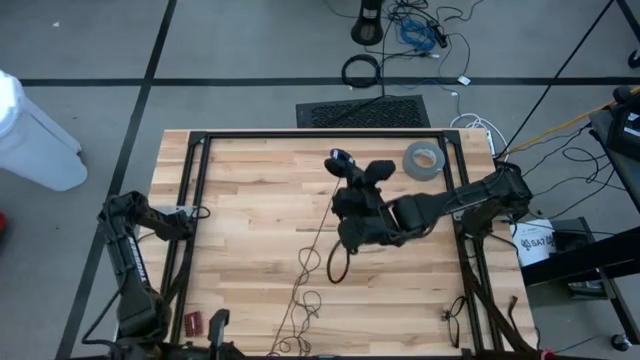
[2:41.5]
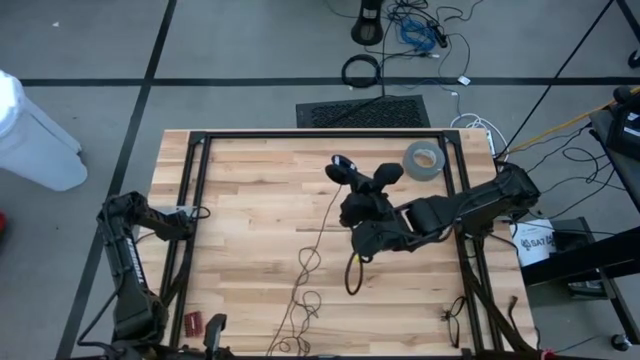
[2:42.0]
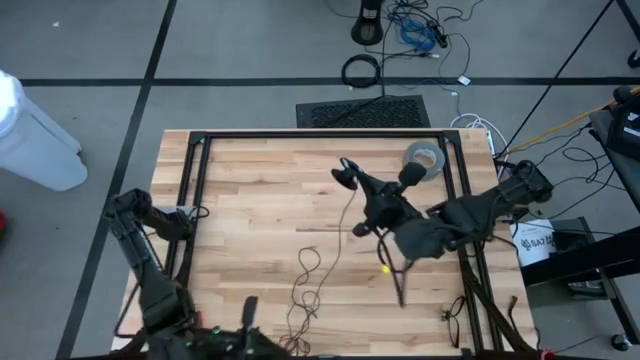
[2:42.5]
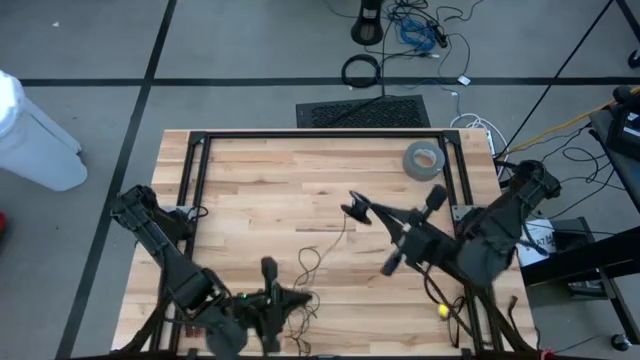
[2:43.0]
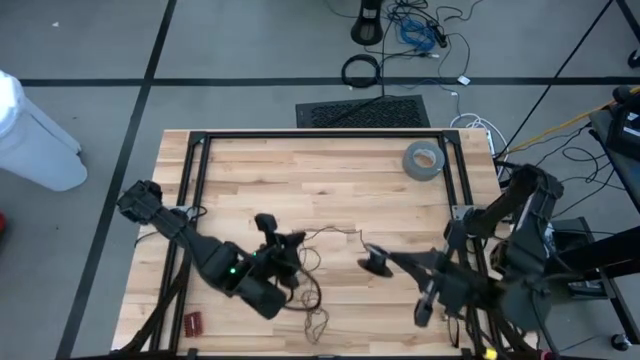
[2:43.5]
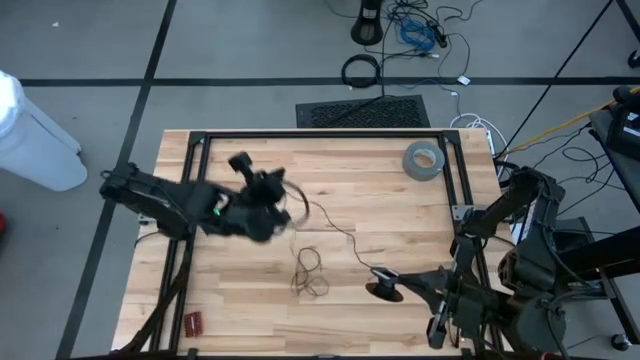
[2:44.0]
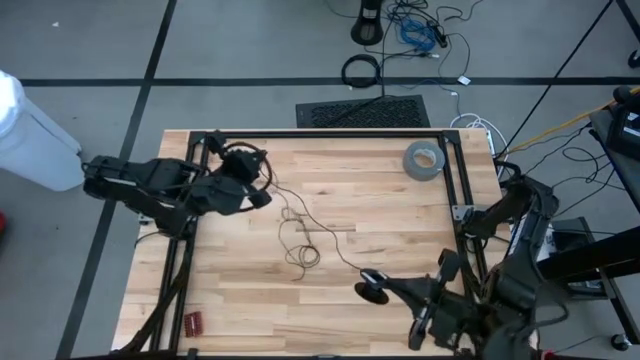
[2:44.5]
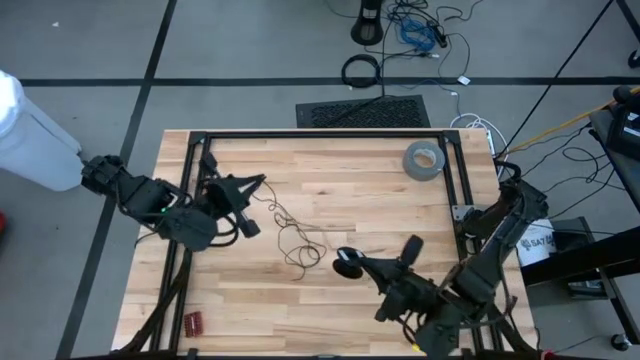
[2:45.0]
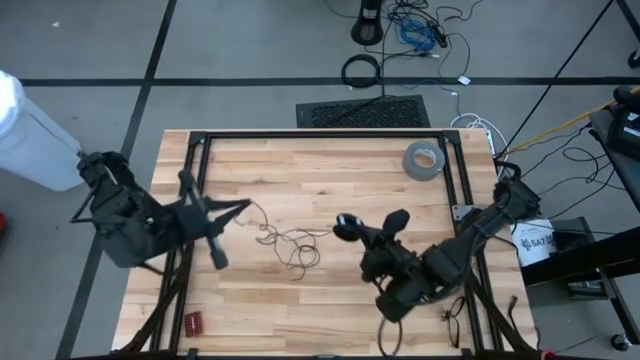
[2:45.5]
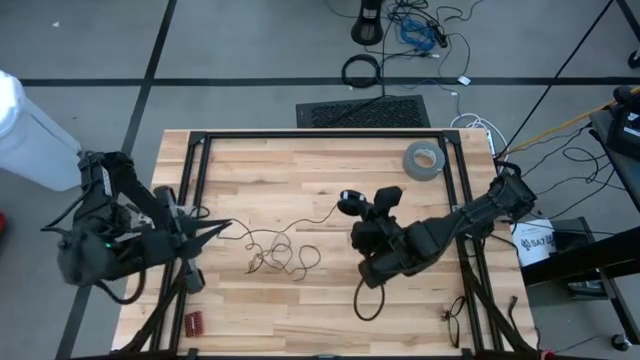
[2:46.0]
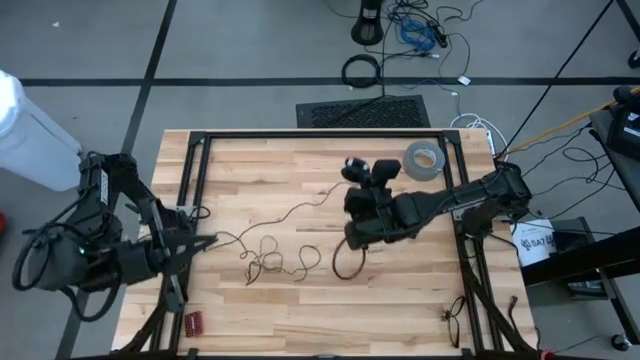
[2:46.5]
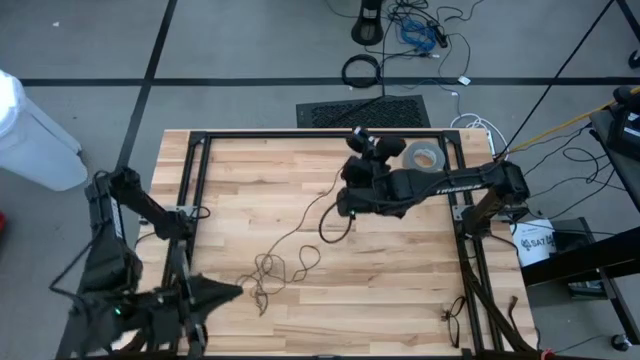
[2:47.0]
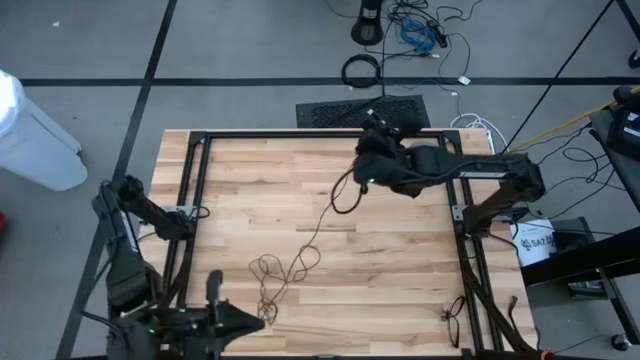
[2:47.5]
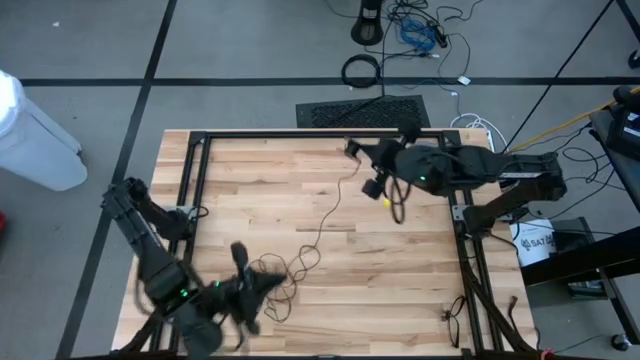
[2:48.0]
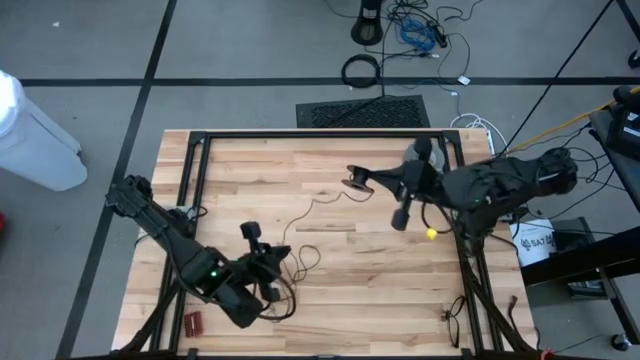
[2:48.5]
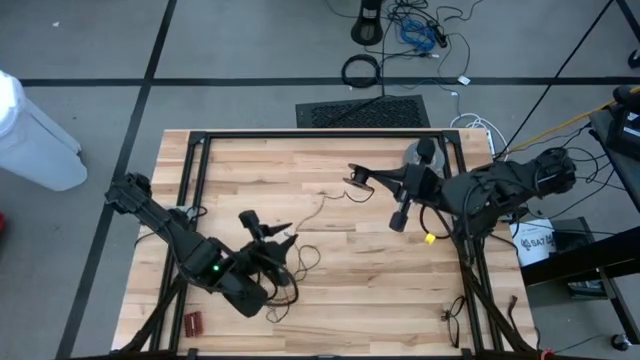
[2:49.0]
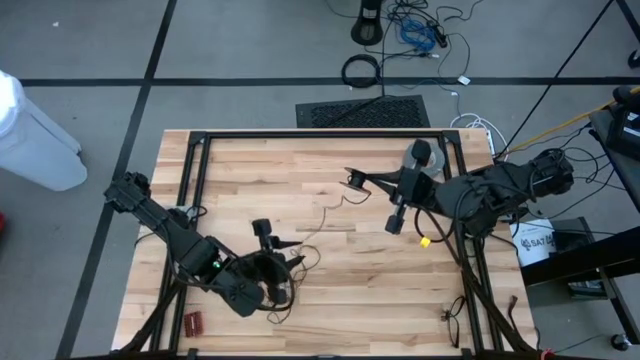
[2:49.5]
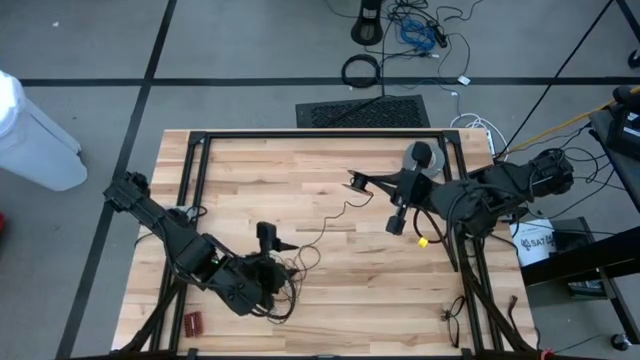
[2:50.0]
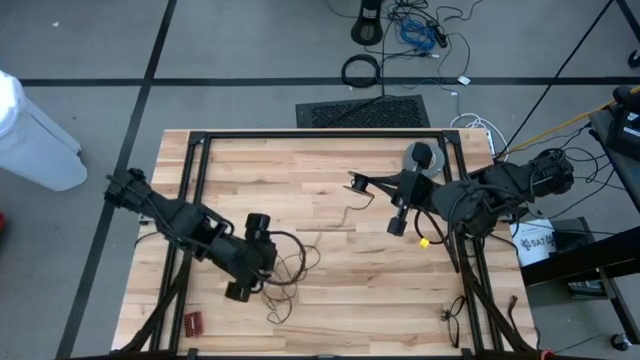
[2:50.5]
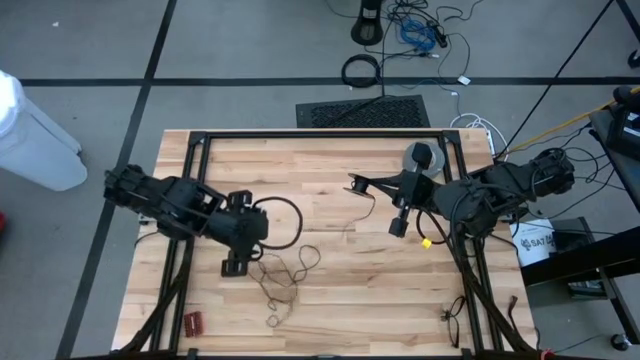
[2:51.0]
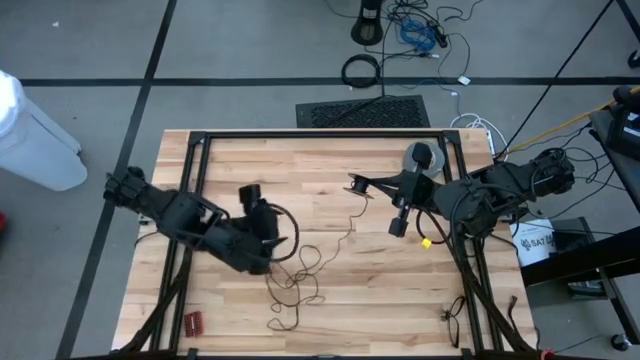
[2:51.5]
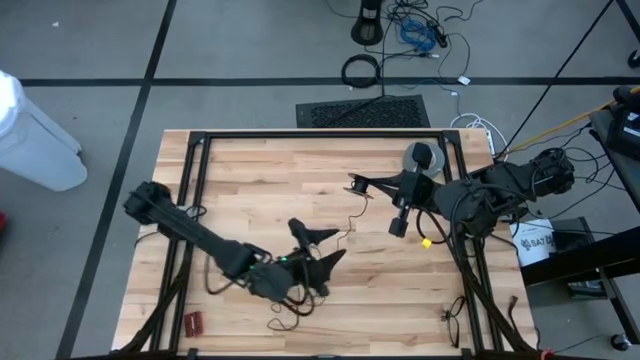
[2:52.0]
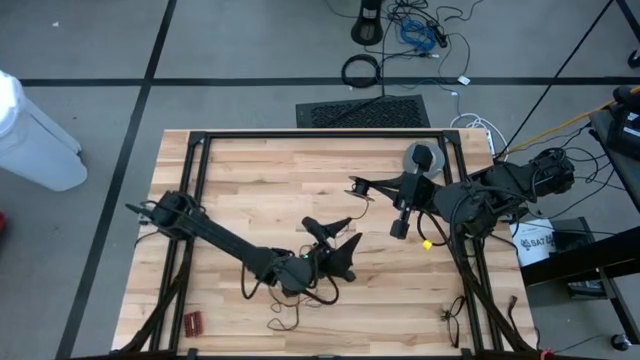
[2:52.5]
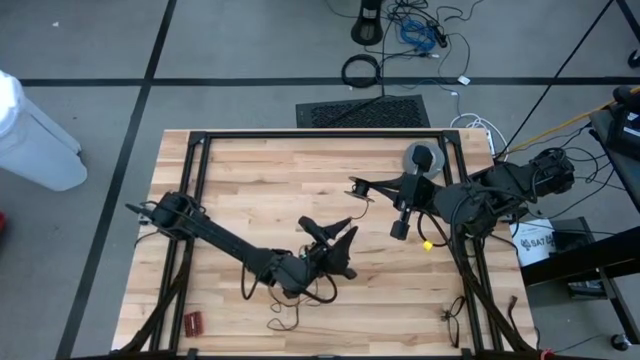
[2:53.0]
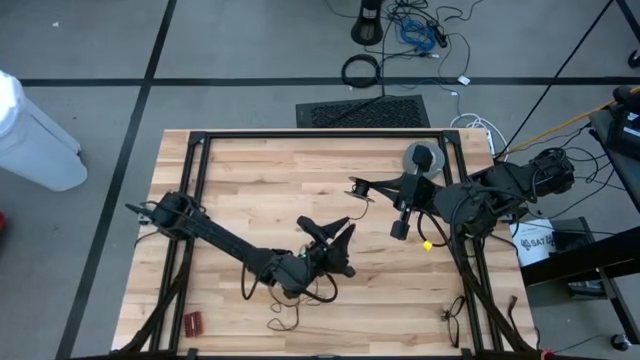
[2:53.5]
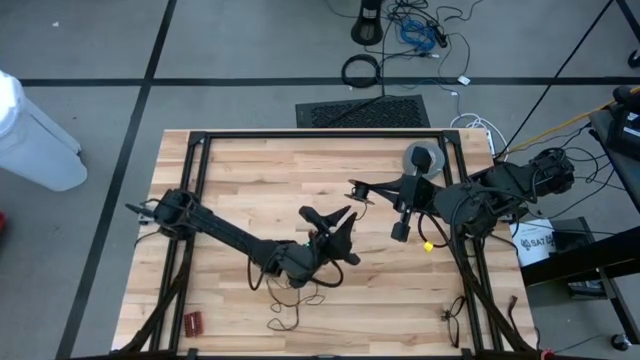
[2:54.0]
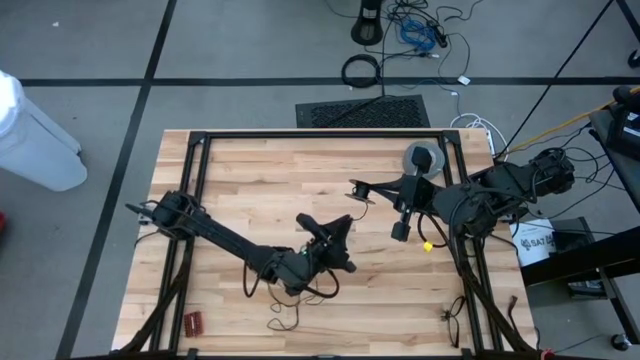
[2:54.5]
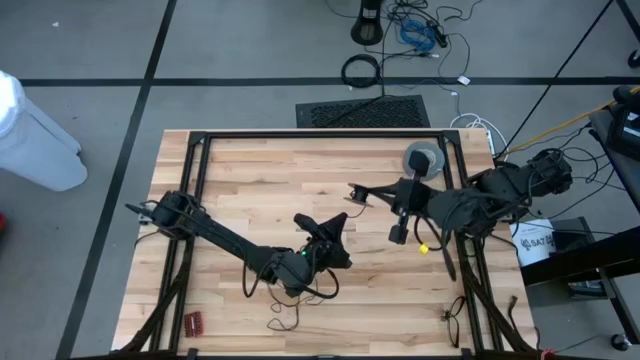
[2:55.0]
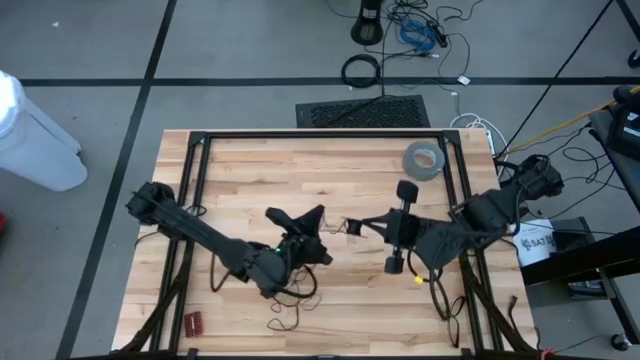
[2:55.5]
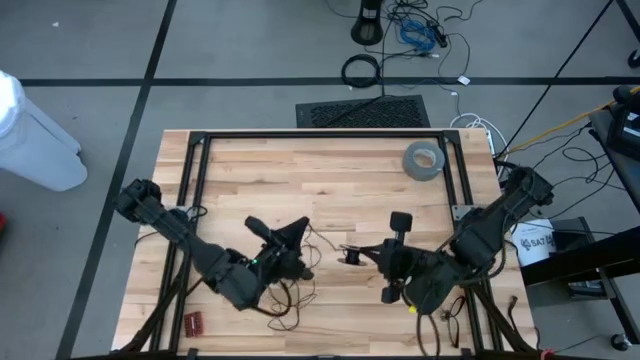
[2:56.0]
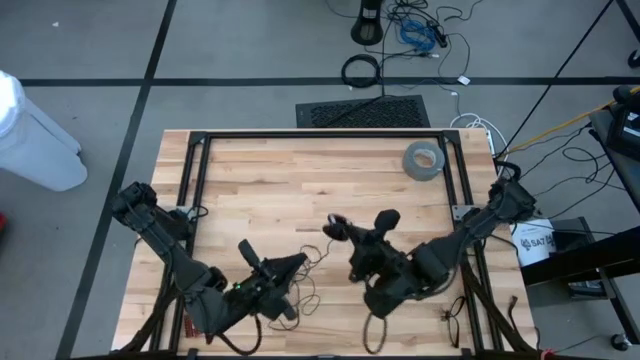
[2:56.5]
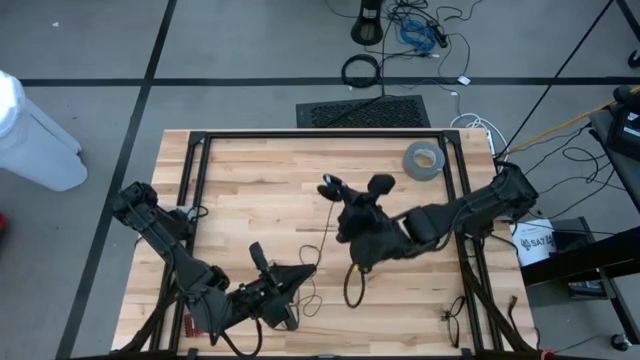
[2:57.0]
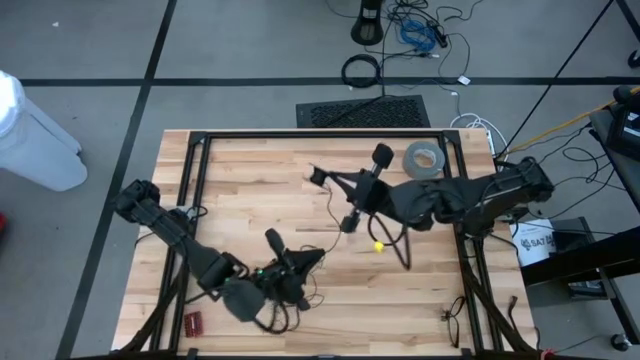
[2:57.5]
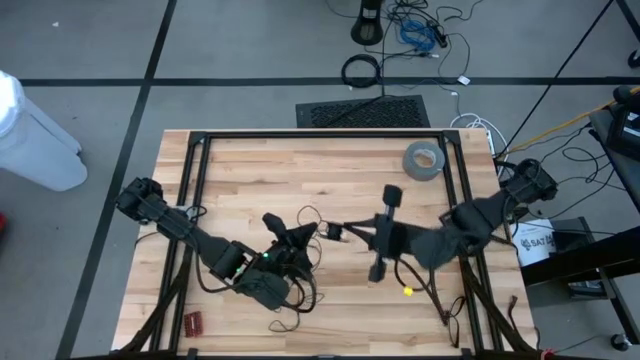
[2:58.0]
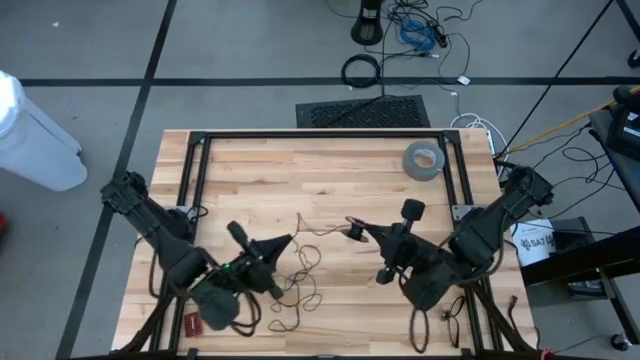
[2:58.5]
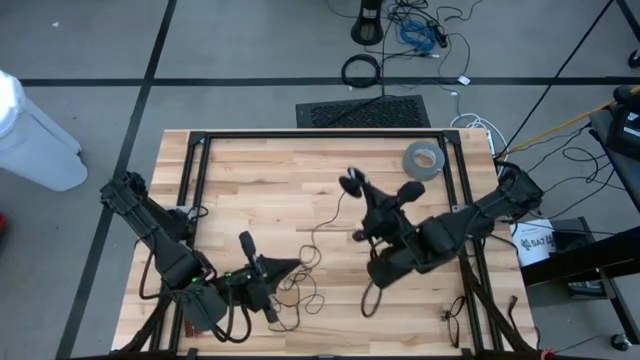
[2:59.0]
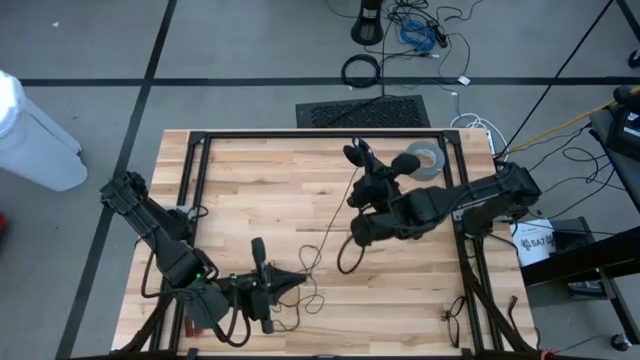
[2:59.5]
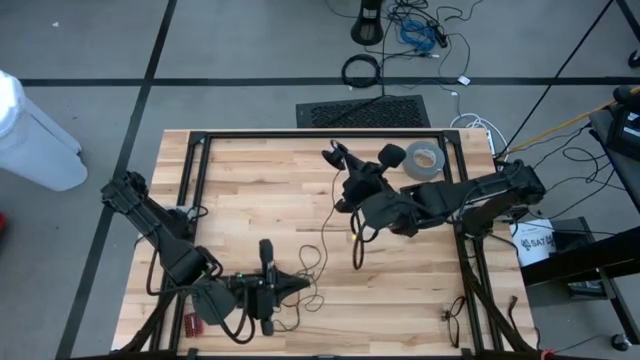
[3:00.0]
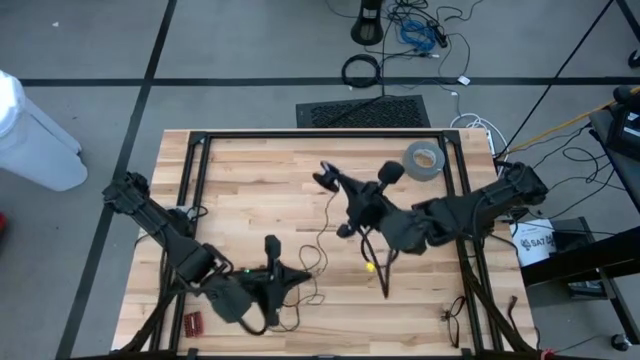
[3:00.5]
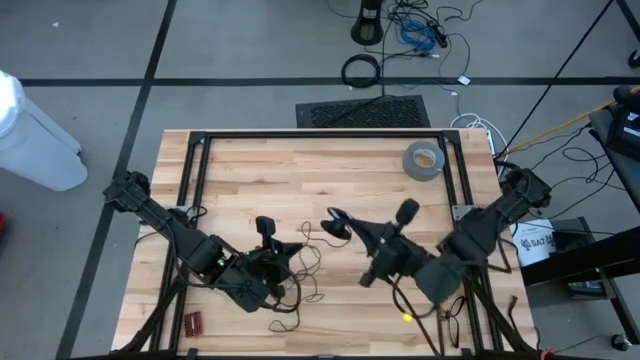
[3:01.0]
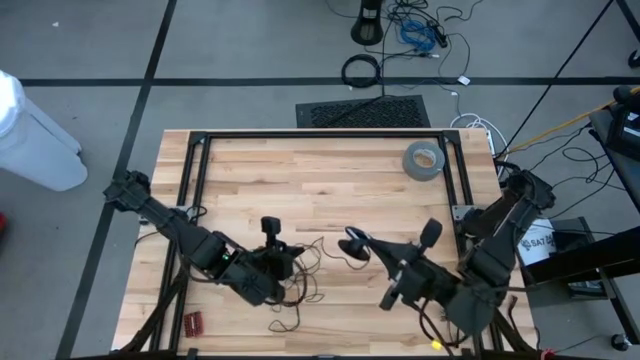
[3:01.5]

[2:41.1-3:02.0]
Task: Coil cords
Uncoil the black wire from the spool
